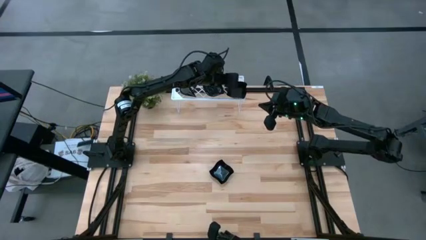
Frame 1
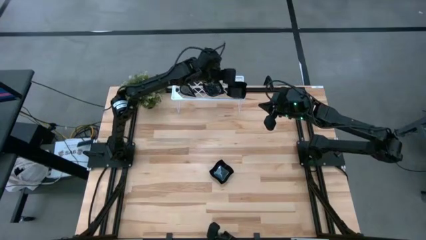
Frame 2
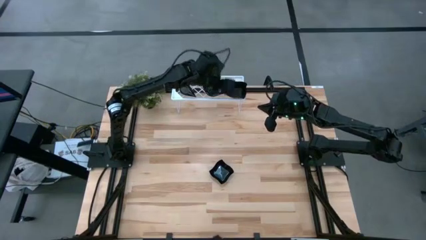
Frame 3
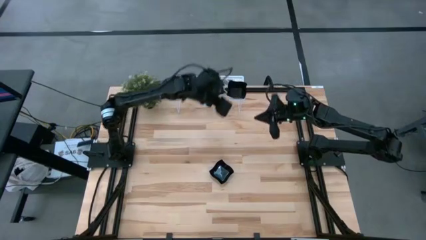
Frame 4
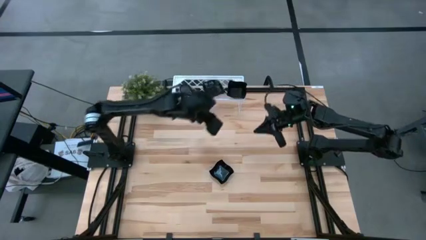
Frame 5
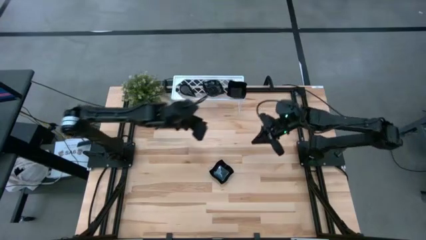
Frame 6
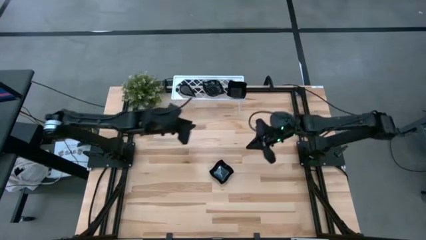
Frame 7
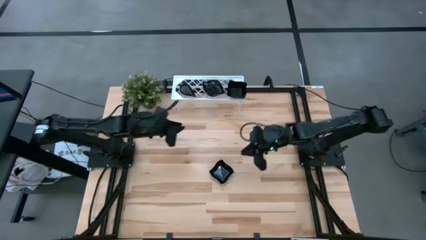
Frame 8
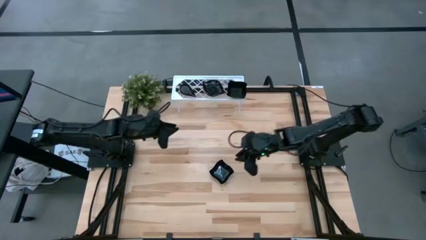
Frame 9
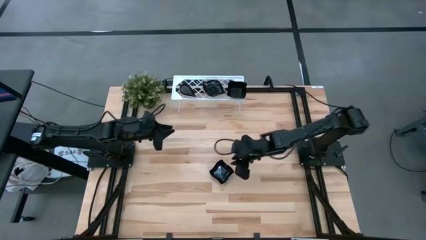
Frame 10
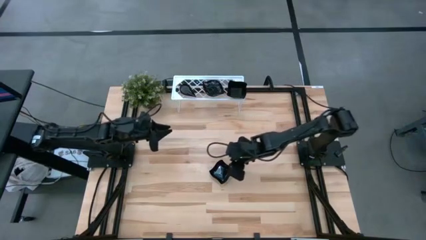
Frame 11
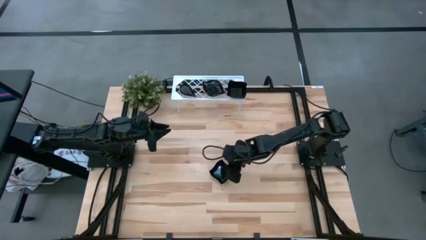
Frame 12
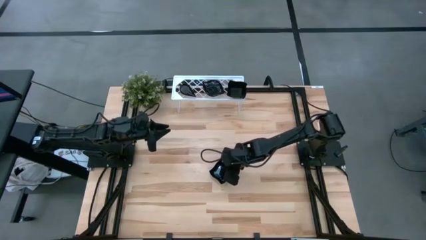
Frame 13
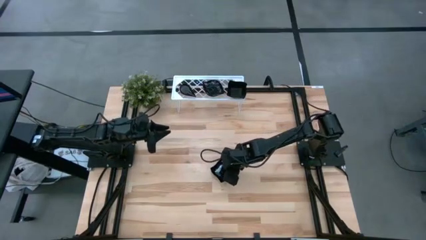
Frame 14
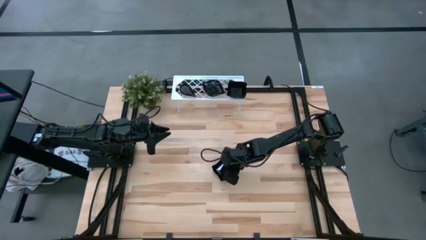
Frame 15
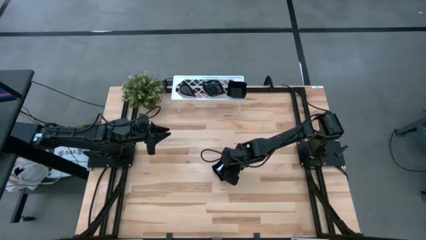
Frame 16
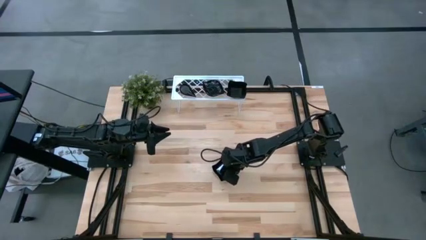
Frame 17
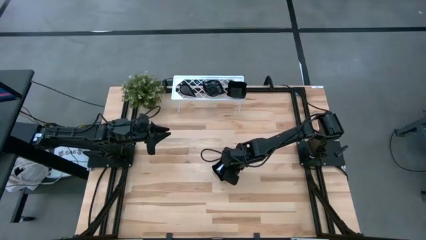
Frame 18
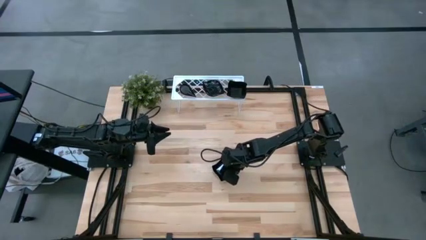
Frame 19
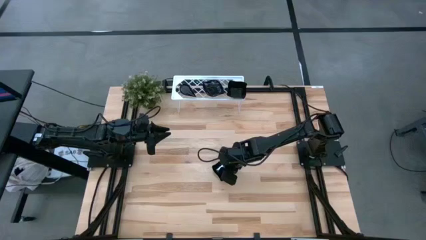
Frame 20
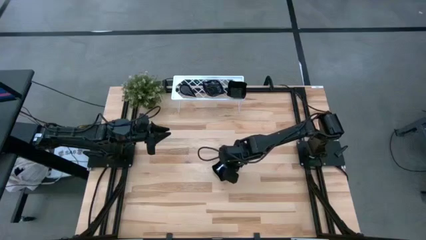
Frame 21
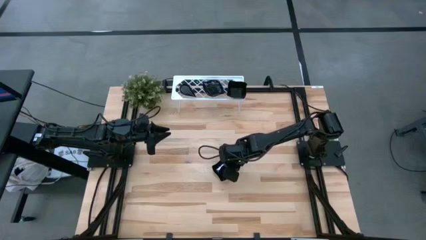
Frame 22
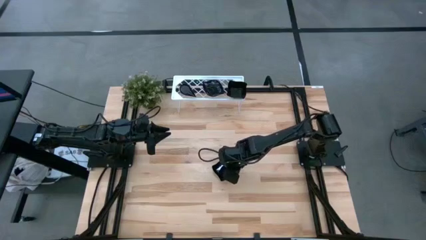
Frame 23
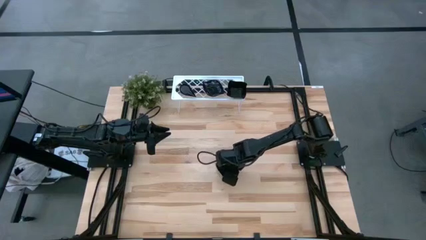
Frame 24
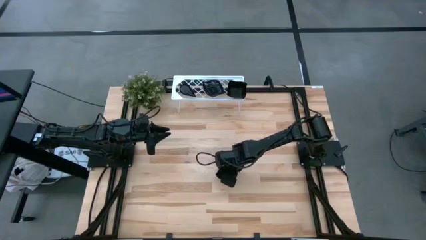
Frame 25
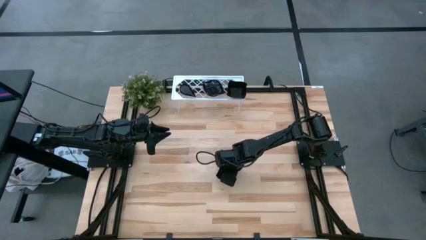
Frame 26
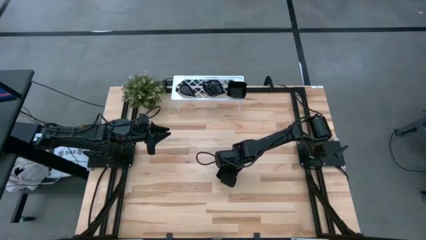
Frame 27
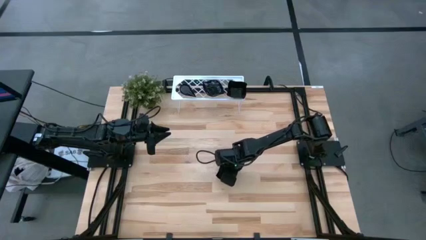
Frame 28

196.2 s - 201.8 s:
Task: Pick & Place Mini shaped plates
Stack the black distorted square plate on top of the black distorted square plate on the shelf

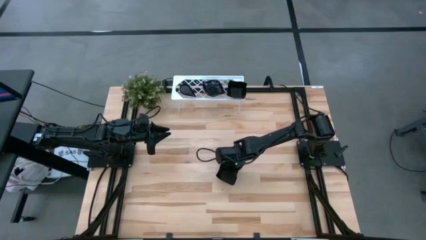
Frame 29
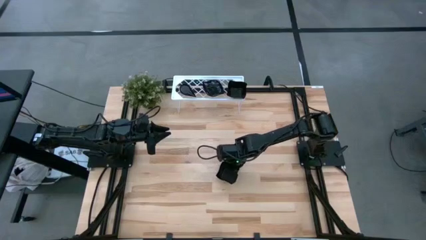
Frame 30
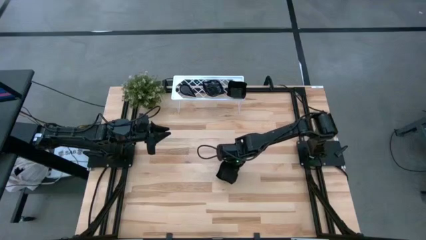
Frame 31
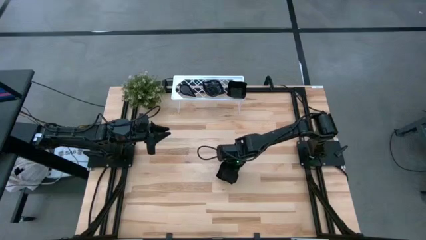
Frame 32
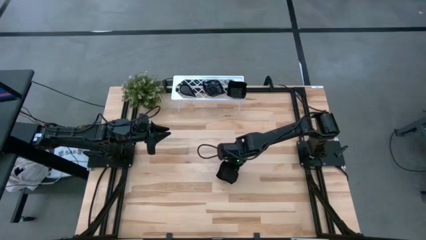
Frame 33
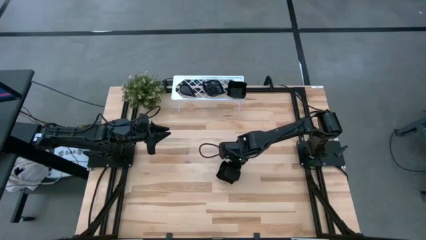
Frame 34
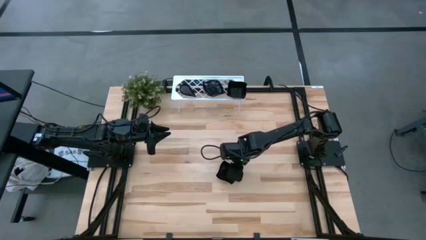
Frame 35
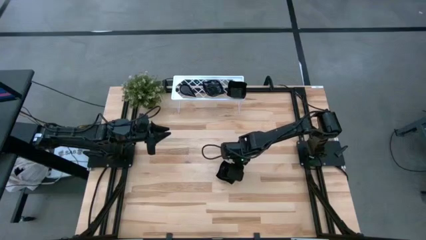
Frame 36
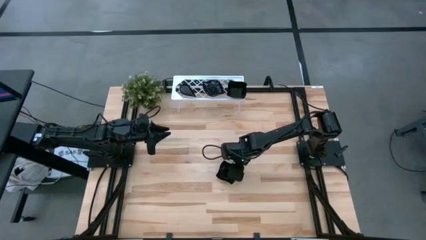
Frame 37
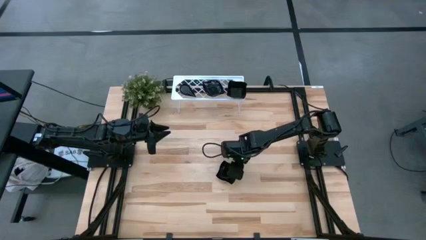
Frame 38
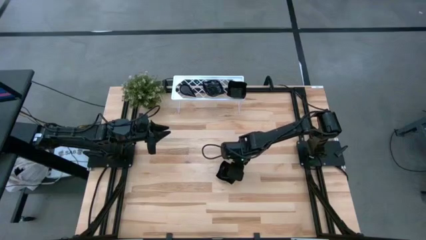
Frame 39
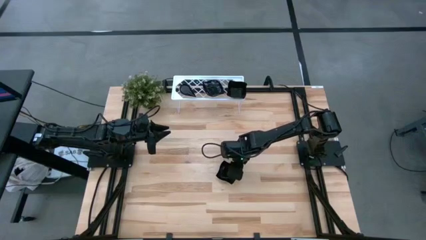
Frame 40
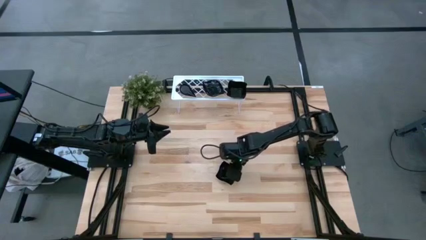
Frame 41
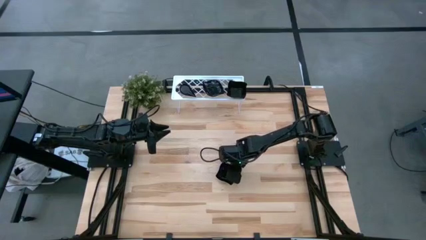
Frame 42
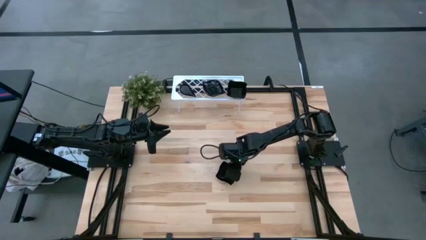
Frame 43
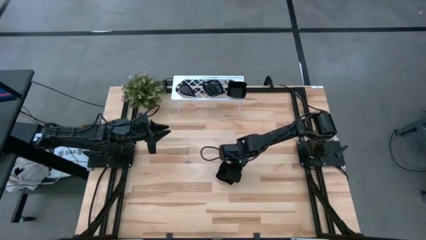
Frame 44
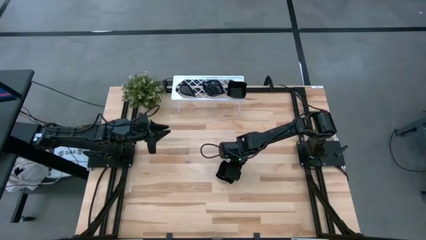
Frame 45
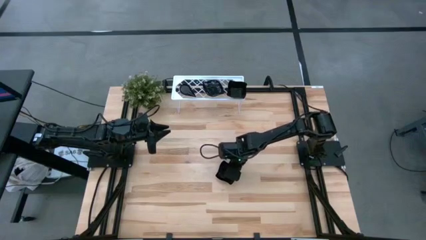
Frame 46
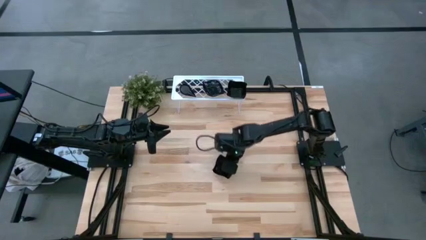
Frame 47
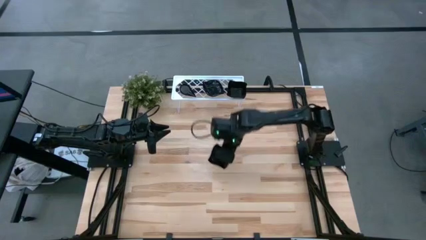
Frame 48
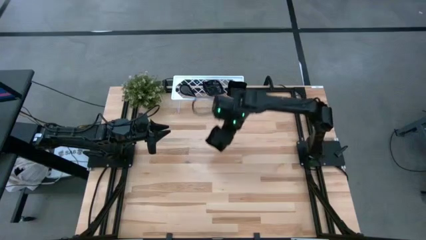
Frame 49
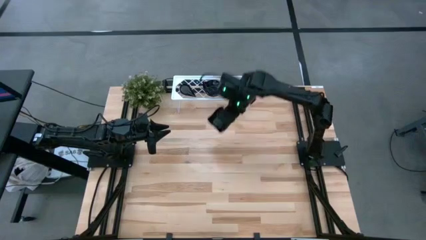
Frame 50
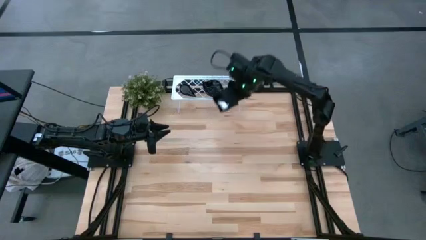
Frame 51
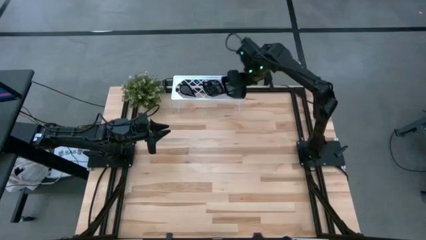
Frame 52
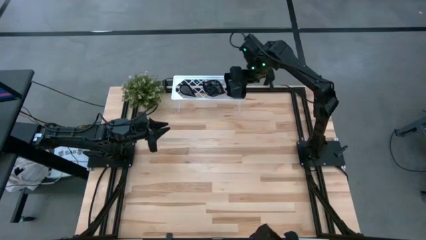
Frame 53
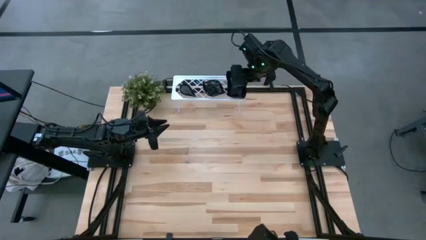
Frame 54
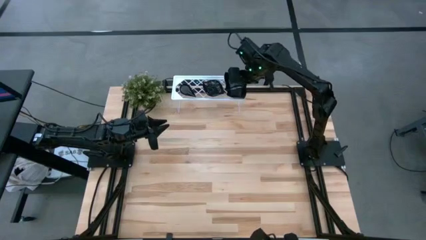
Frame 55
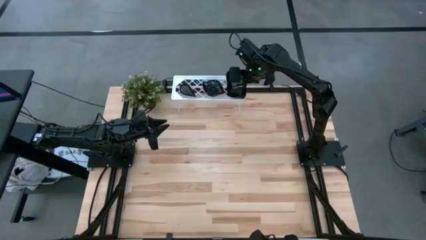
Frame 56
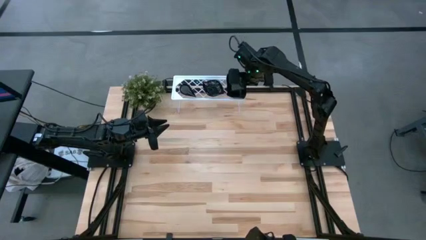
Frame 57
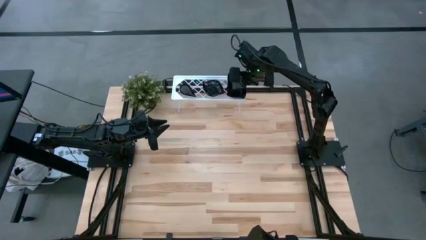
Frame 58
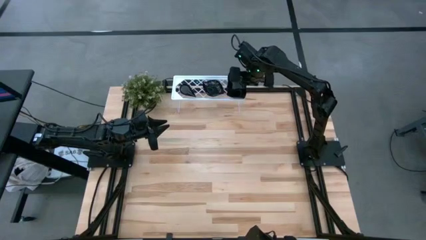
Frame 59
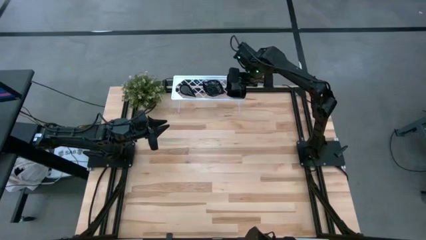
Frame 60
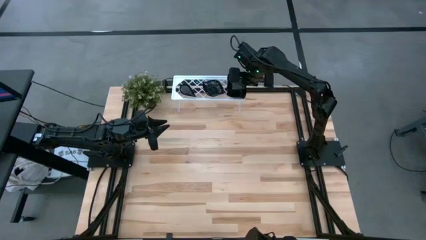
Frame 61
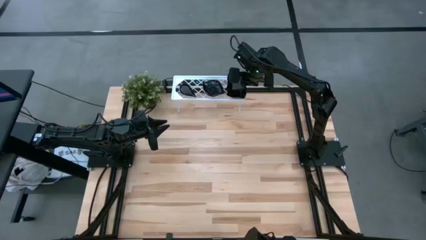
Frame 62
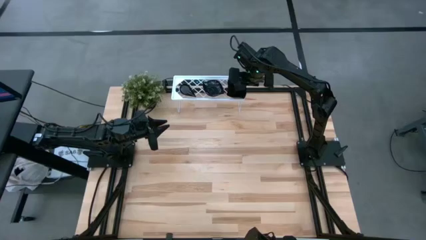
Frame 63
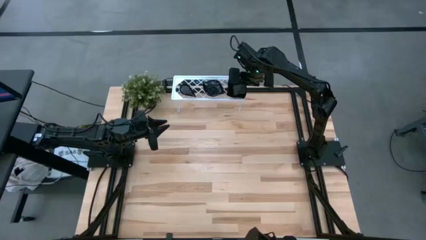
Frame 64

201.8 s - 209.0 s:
Stack the black distorted square plate on top of the black distorted square plate on the shelf

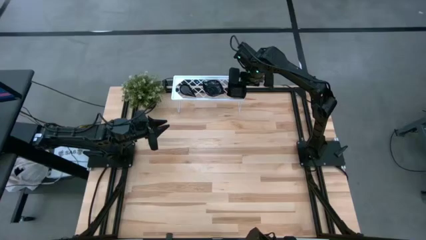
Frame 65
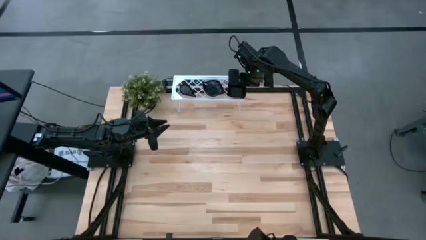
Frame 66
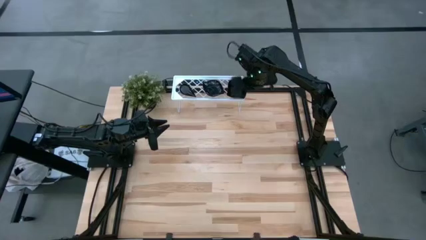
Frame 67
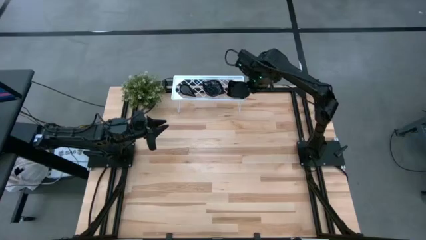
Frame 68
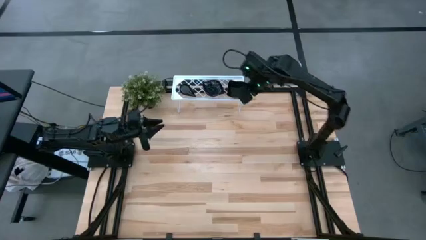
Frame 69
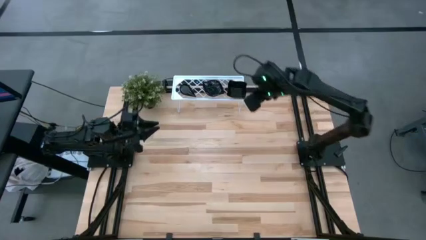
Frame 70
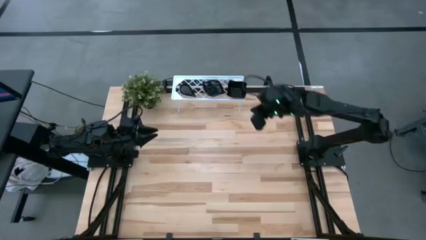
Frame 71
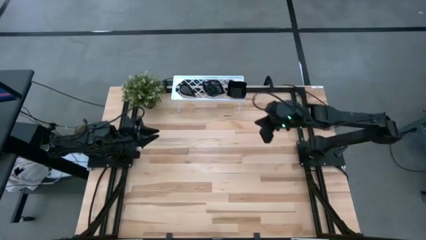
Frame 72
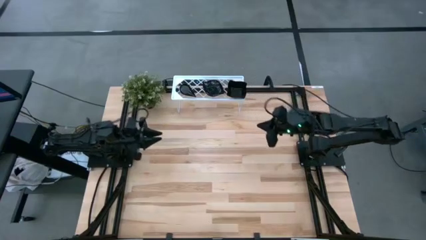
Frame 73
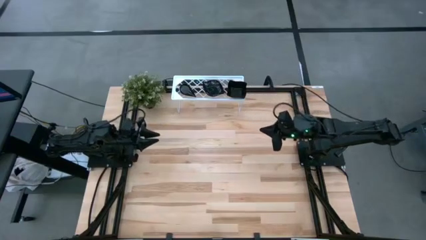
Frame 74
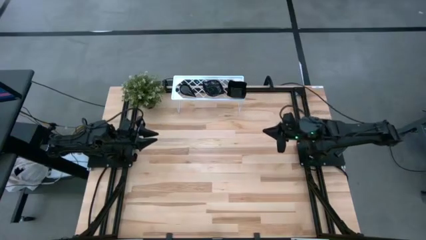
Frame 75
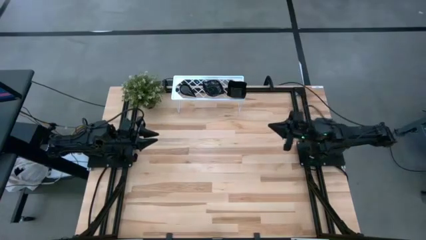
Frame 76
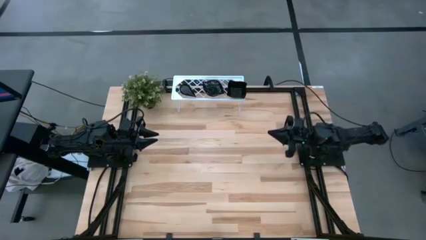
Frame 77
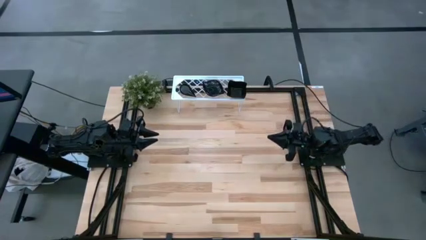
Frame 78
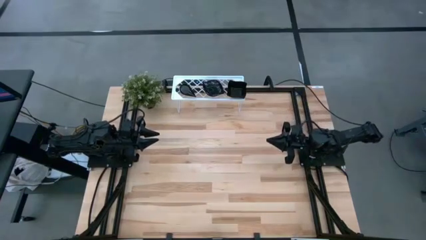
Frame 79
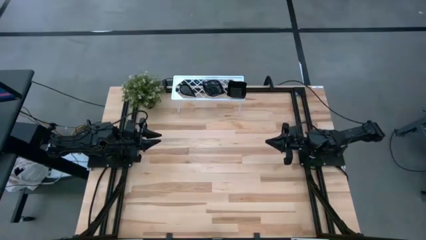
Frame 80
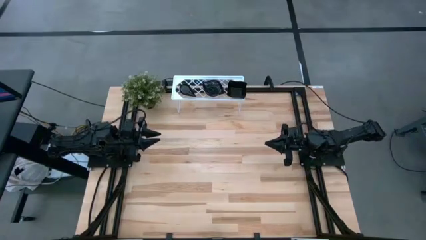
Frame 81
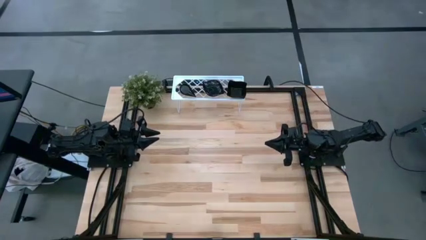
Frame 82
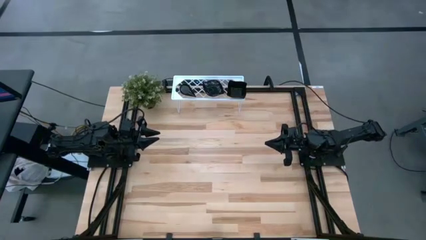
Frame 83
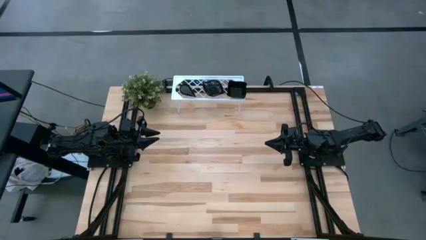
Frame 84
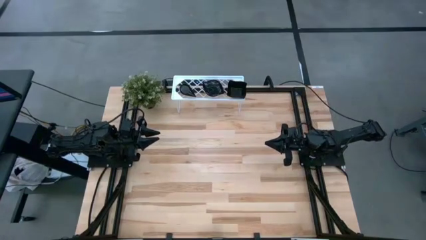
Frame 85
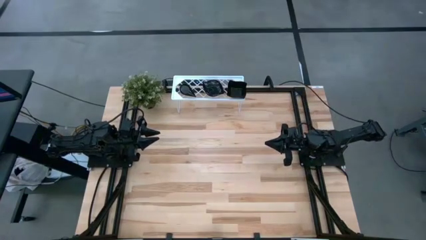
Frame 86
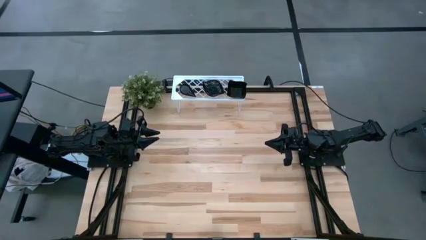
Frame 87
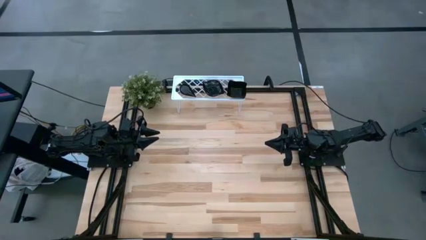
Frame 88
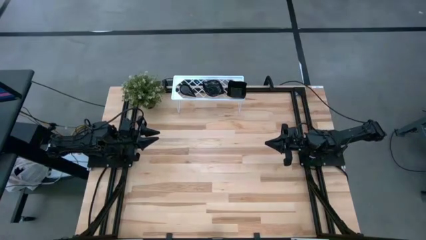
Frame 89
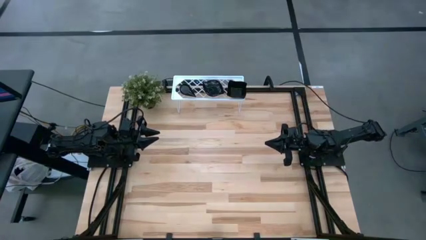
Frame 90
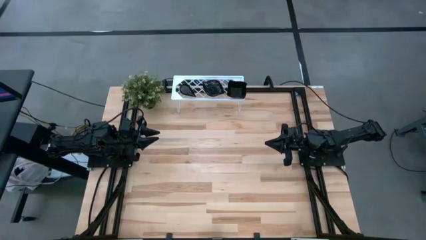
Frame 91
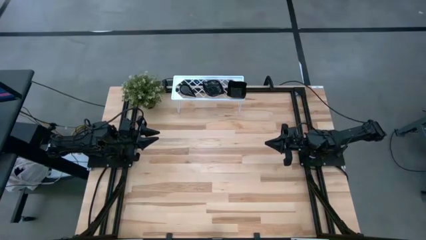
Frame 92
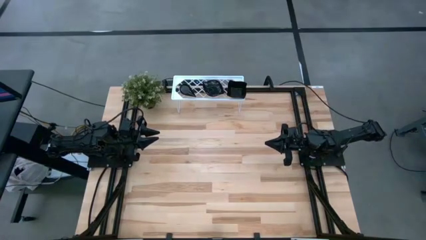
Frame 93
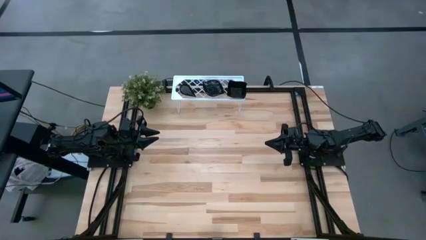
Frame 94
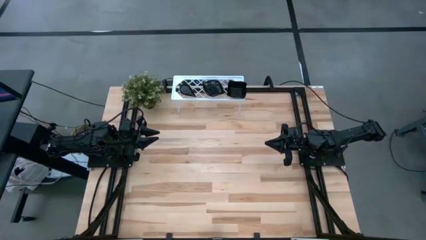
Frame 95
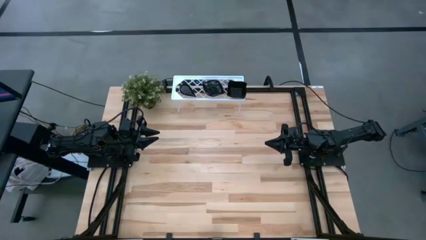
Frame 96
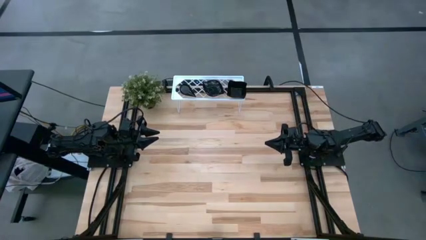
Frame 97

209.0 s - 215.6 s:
Return to Home Position
